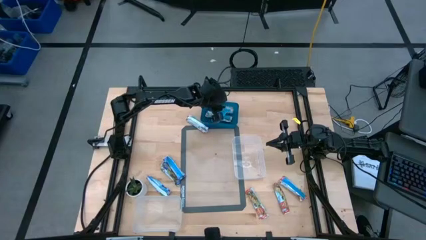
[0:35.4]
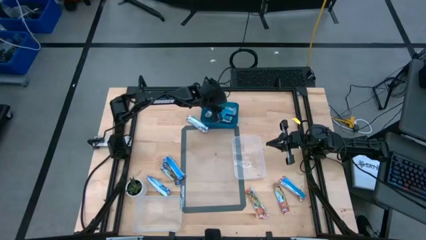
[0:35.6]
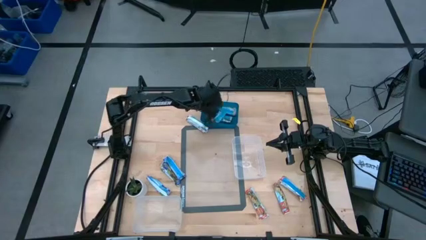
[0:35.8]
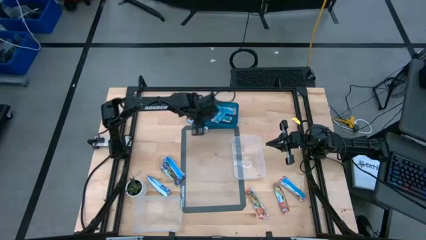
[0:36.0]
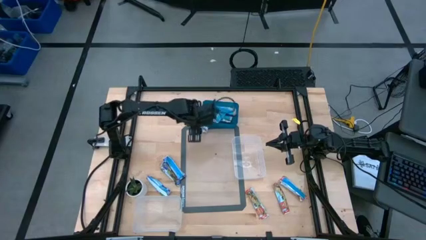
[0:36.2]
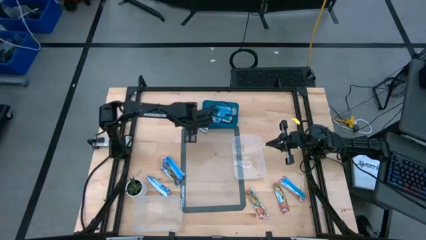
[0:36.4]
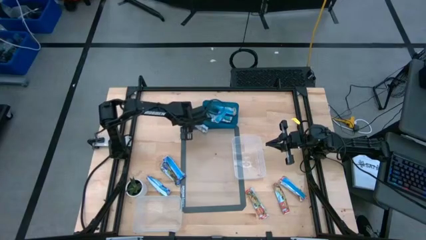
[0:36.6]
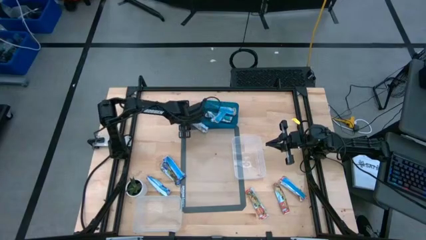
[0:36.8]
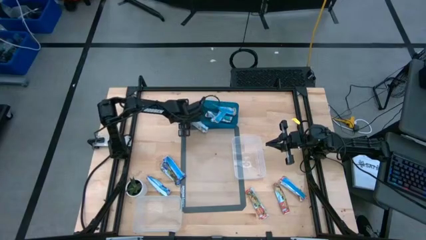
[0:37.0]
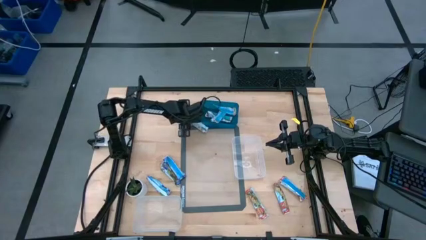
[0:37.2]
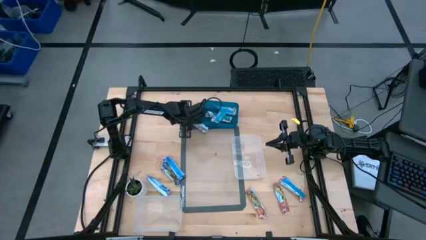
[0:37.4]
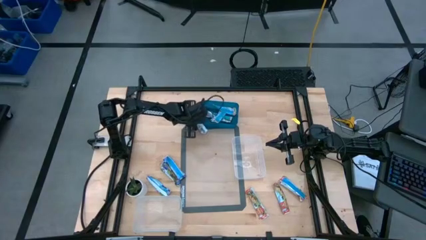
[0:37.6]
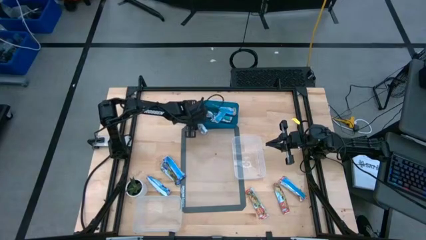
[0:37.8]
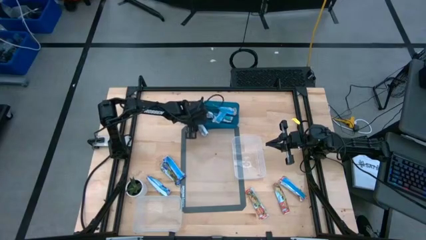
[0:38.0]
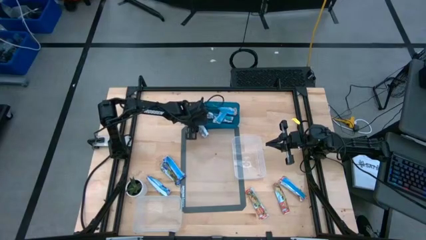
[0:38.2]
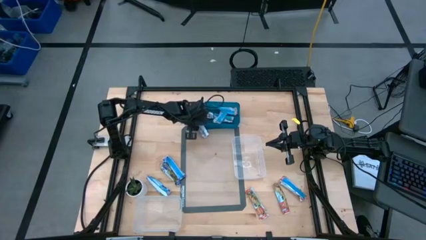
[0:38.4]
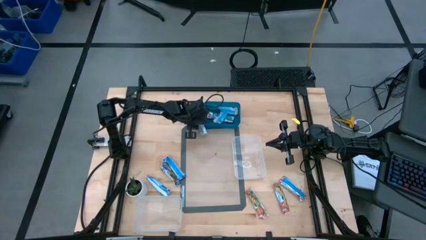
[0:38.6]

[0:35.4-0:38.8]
Task: Pick and place Granola Bars by type
Put the orange granola bar into the blue bin

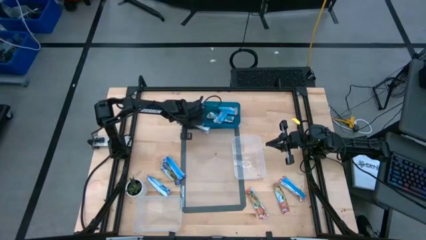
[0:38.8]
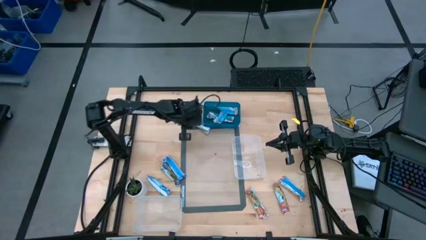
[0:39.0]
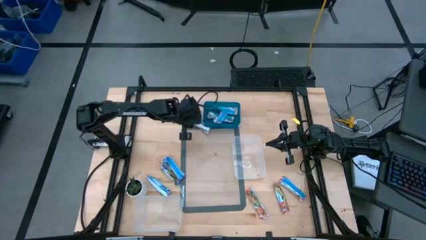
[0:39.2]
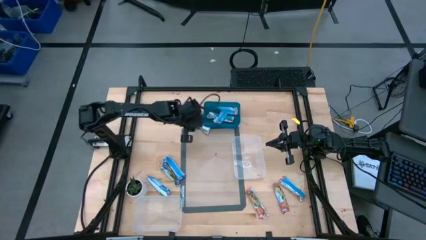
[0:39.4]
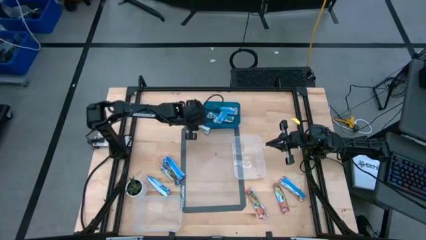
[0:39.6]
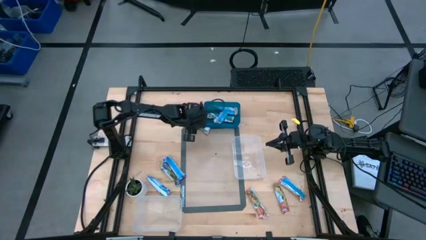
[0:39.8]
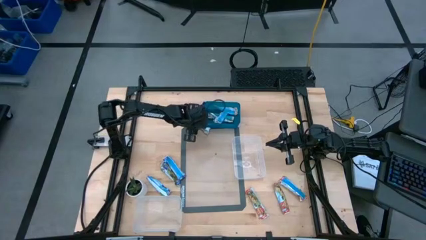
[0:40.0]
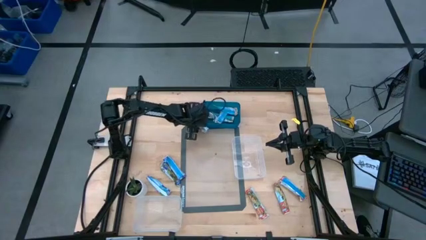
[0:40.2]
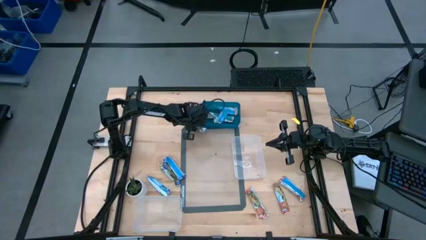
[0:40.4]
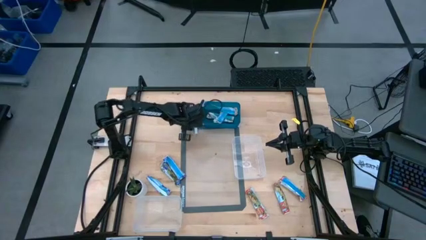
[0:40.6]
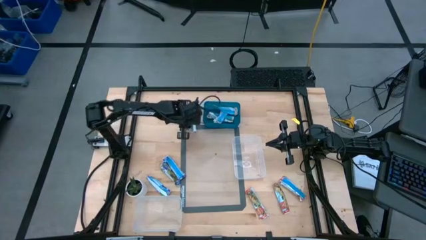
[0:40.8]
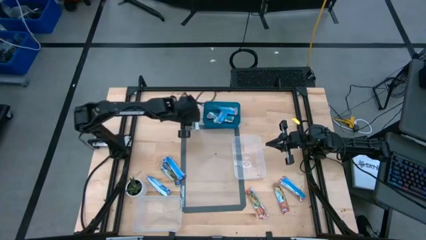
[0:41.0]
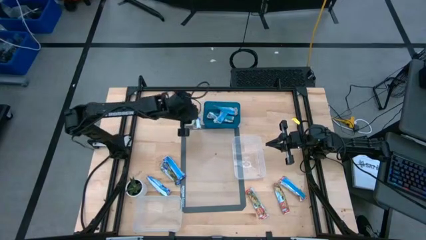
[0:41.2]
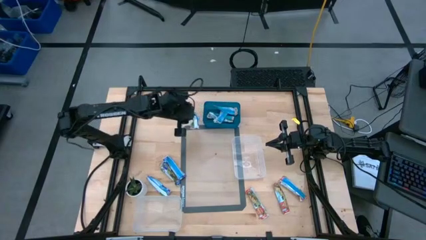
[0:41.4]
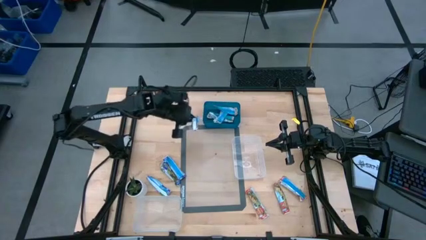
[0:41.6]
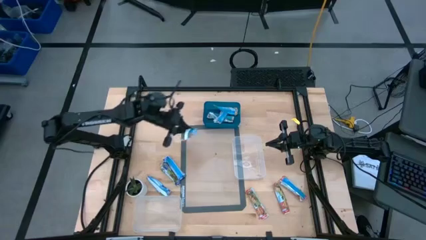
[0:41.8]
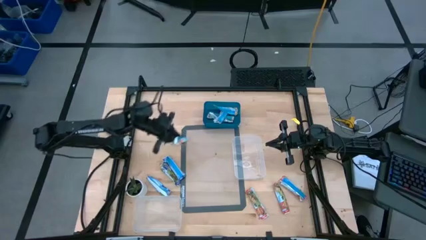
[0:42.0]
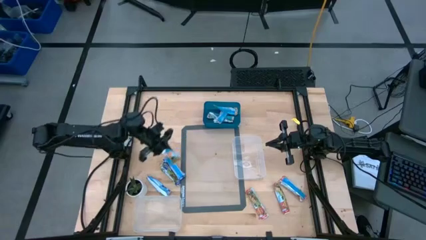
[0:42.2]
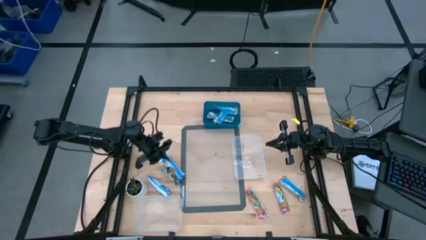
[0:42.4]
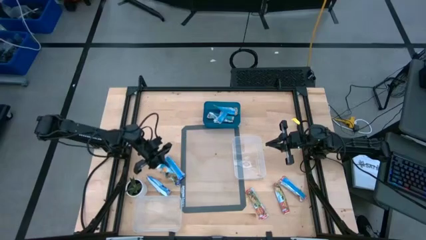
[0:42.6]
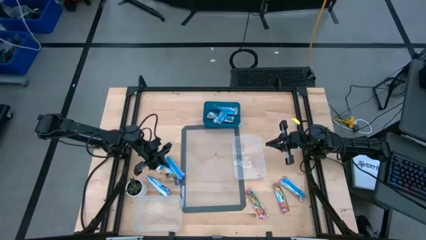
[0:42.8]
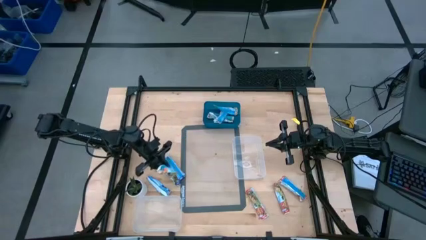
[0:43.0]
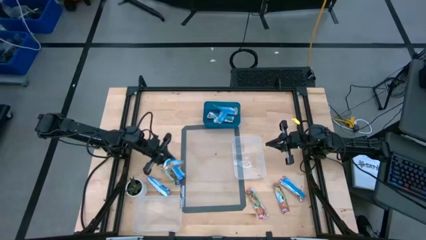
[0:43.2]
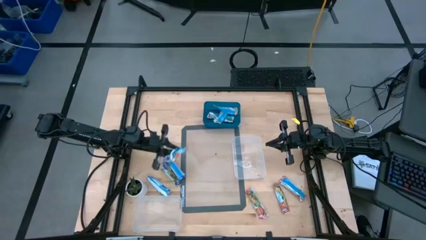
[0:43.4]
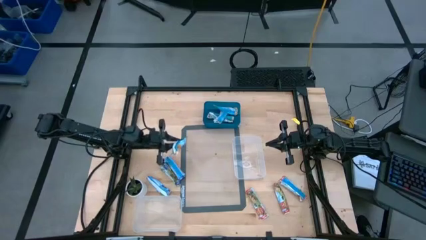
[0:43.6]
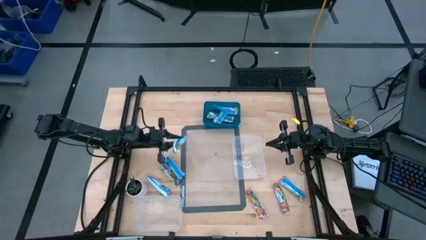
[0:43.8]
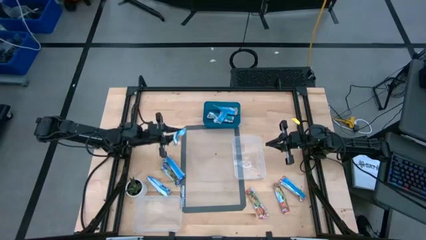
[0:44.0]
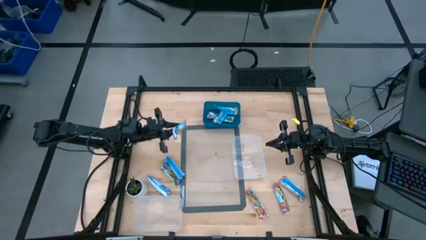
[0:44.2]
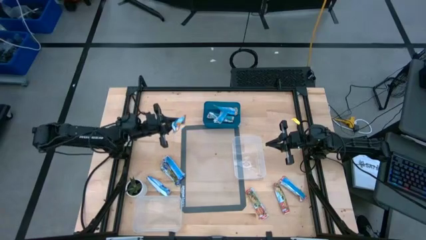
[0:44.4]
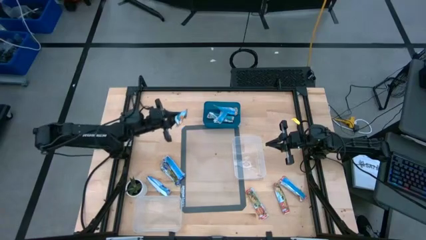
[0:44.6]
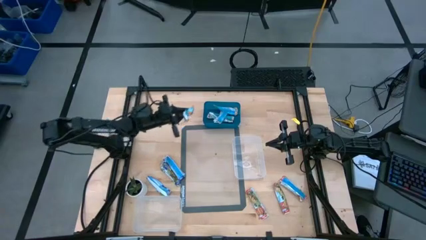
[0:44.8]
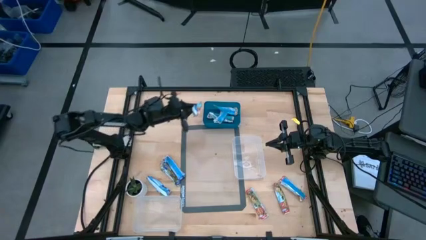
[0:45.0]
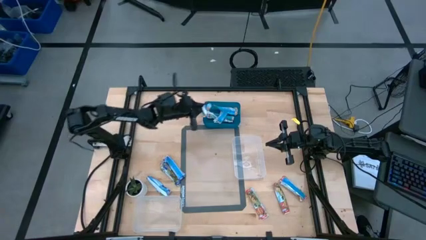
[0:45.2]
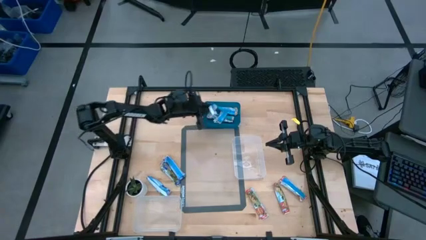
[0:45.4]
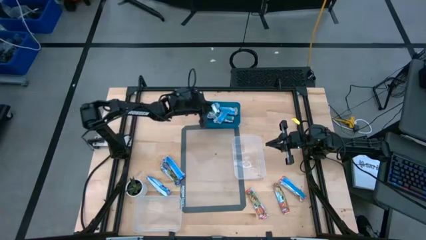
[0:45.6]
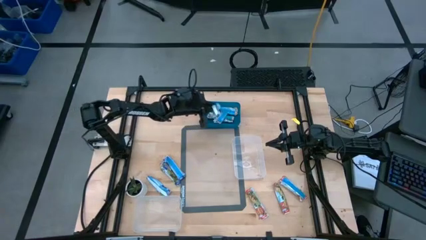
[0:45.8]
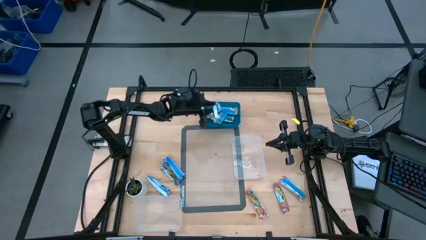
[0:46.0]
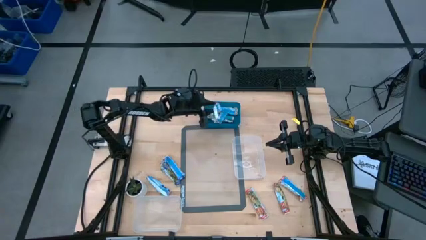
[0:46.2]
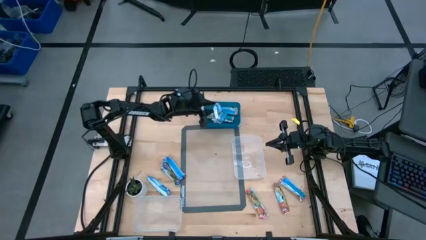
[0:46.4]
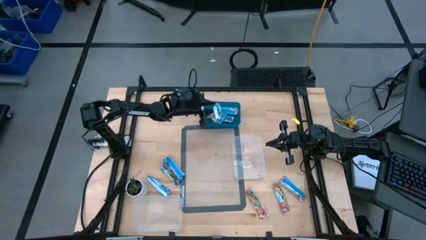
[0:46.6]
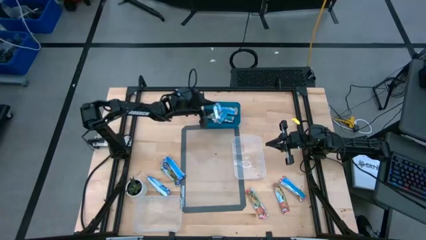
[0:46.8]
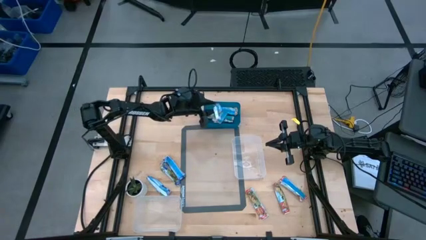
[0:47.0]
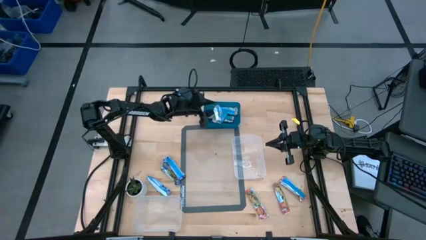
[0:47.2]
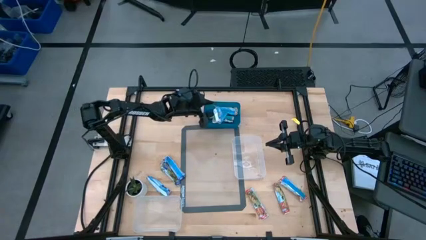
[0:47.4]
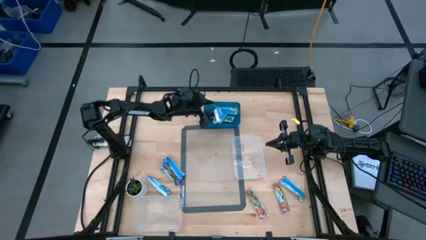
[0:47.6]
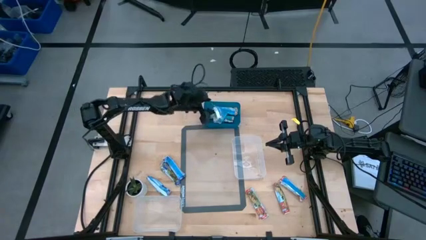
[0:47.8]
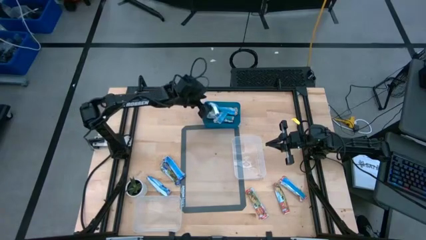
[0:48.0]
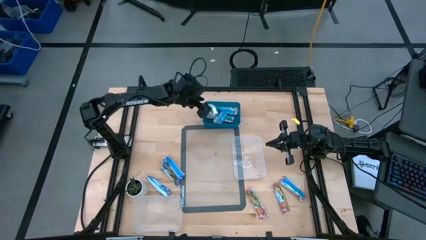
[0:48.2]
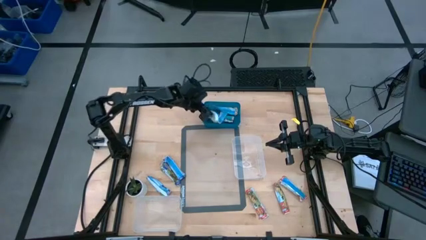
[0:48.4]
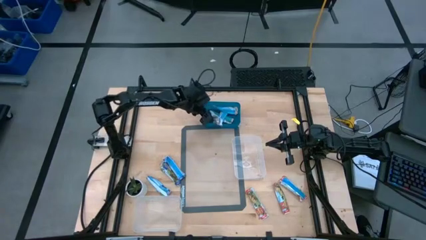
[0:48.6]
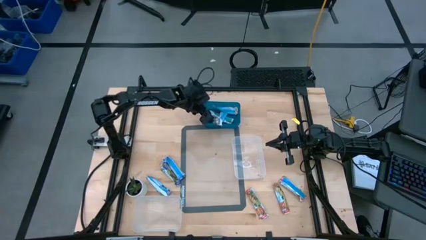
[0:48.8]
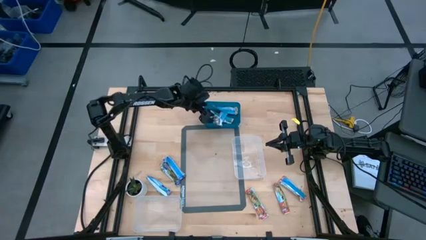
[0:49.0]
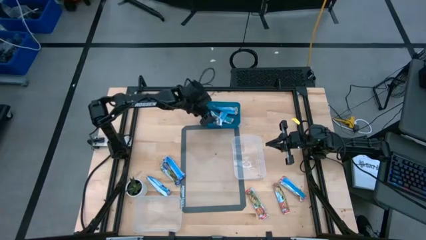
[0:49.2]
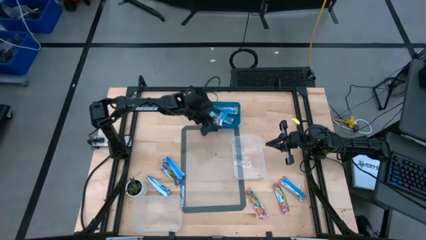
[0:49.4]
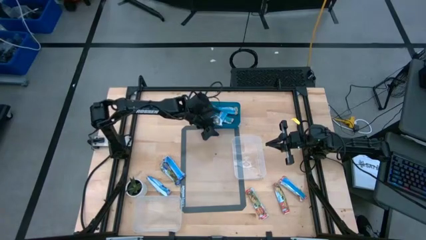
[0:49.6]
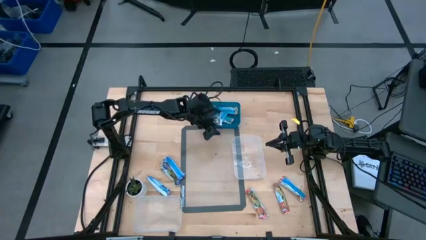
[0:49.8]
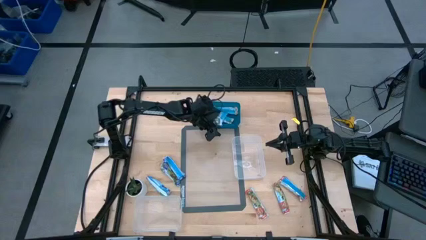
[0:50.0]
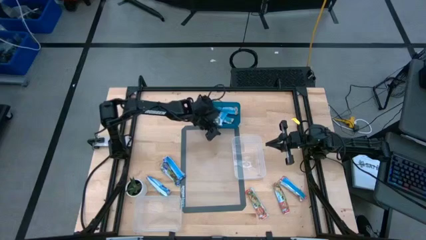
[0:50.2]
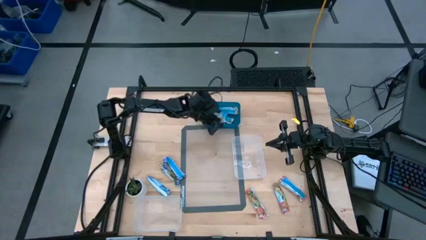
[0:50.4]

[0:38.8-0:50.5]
Put the orange granola bar into the blue bin

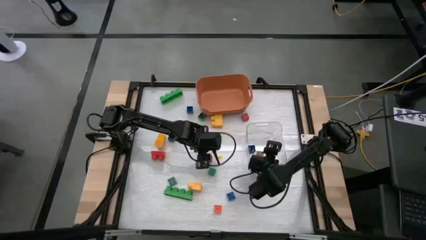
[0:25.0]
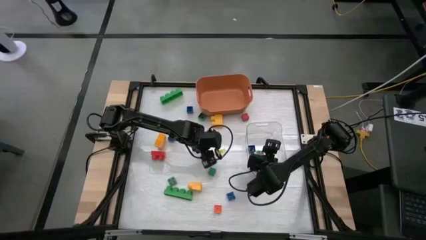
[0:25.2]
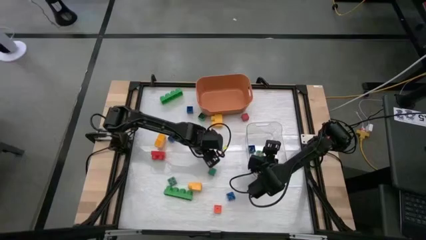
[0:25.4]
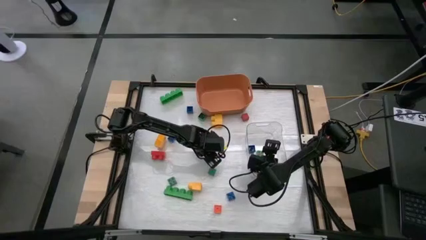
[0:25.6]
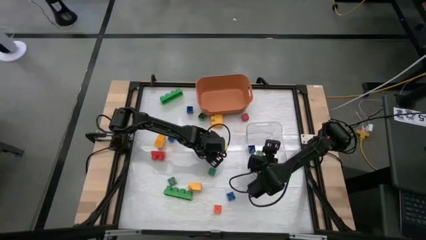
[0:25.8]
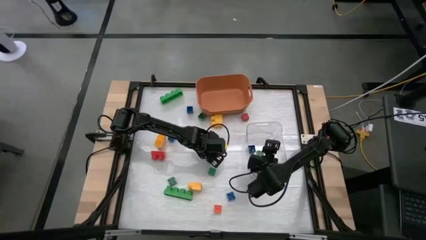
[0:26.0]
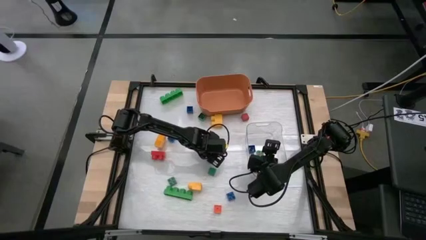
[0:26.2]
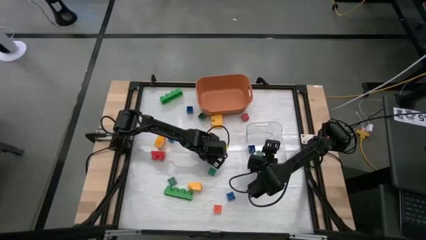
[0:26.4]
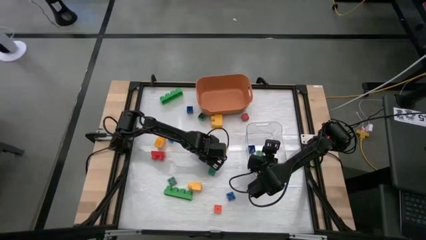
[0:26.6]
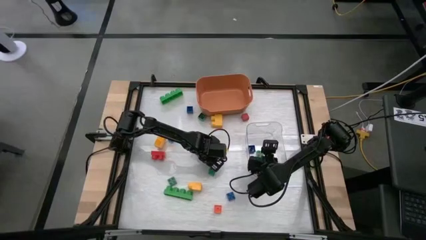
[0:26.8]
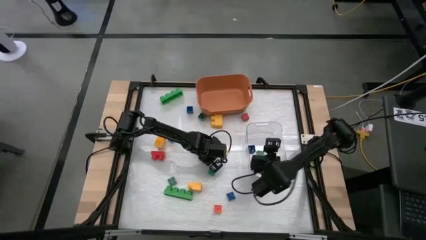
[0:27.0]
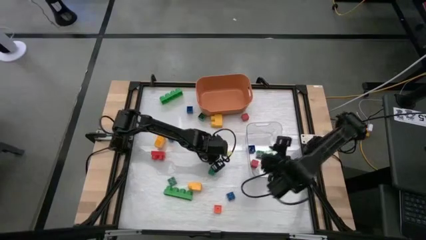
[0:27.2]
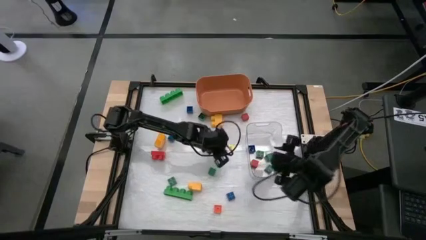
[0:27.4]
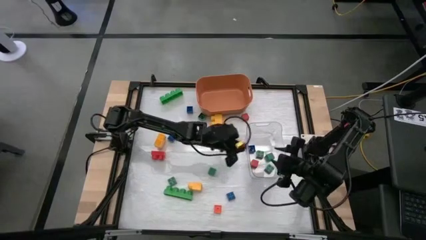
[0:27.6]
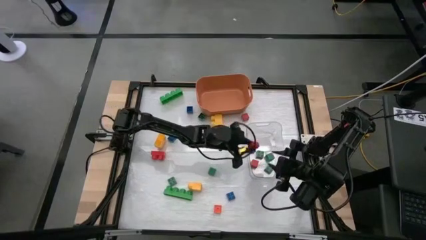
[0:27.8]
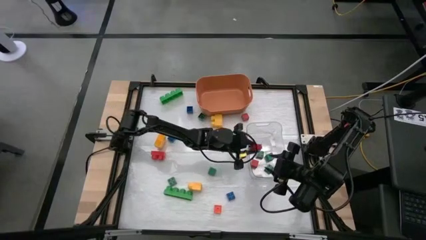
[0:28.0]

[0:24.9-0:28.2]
Task: Sort blocks by size
Put the small red game piece into the transparent bin
